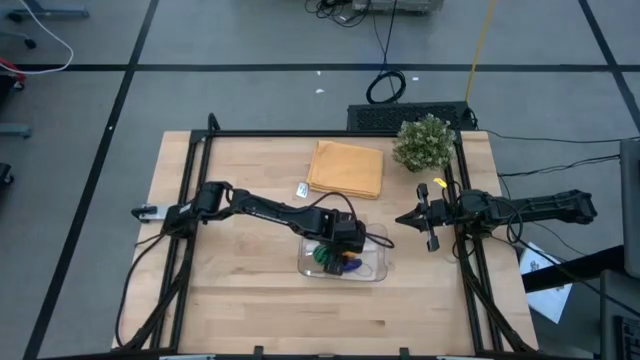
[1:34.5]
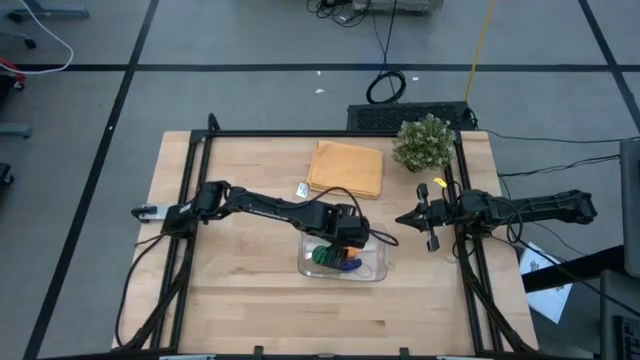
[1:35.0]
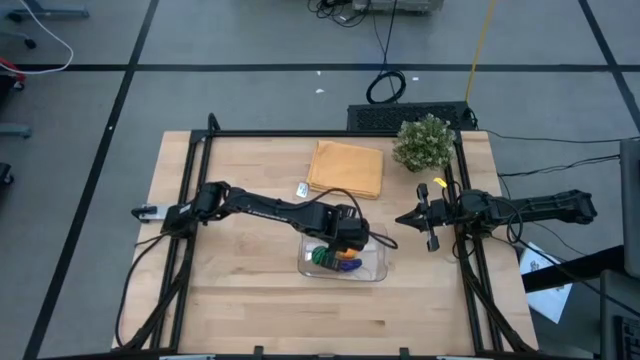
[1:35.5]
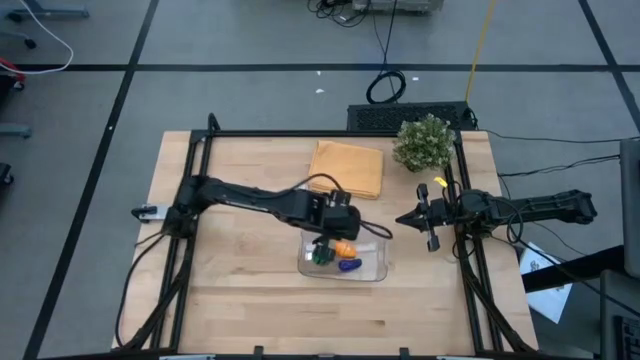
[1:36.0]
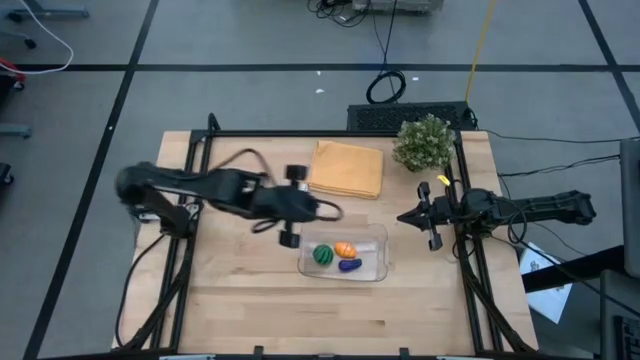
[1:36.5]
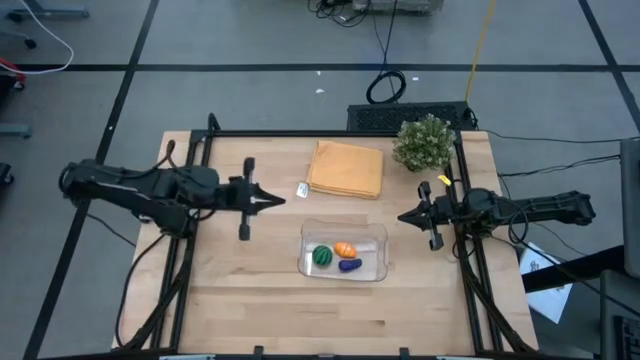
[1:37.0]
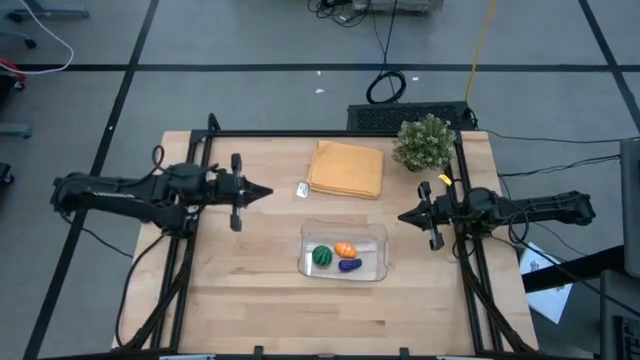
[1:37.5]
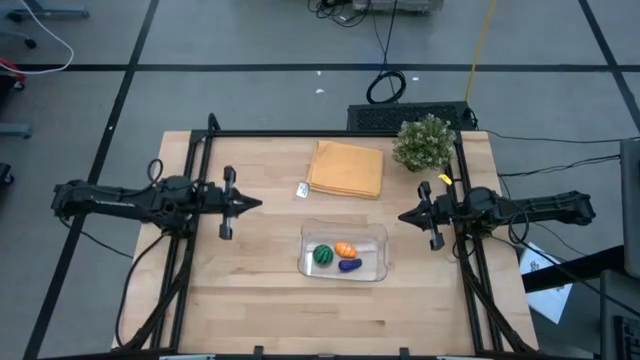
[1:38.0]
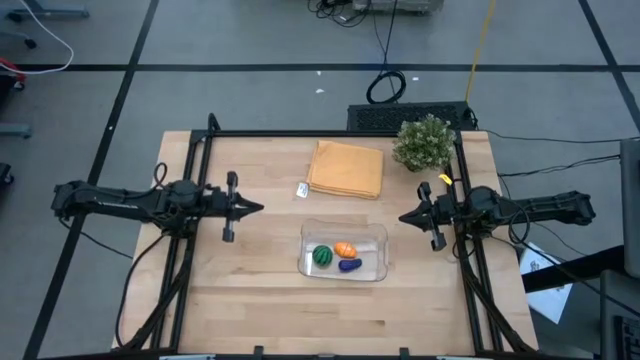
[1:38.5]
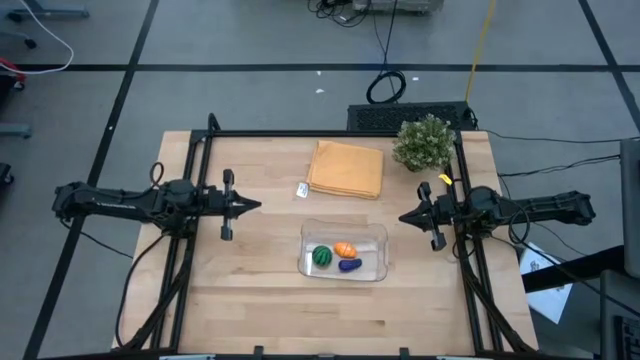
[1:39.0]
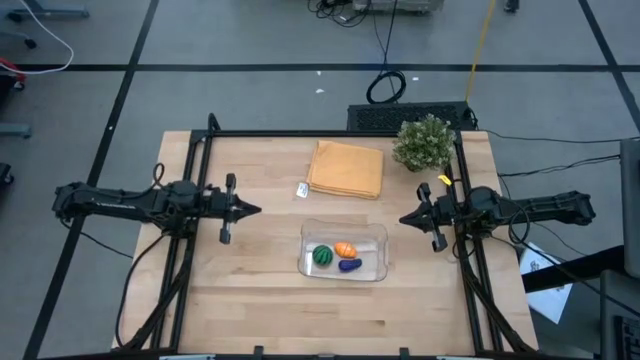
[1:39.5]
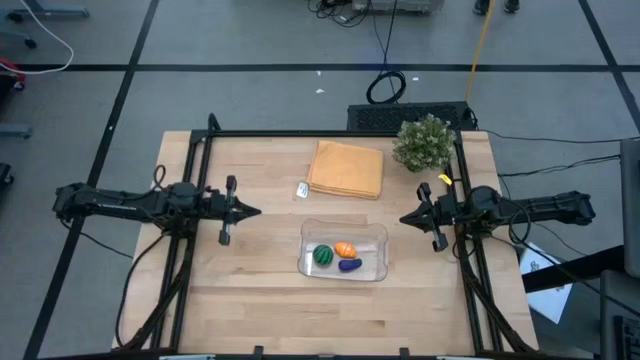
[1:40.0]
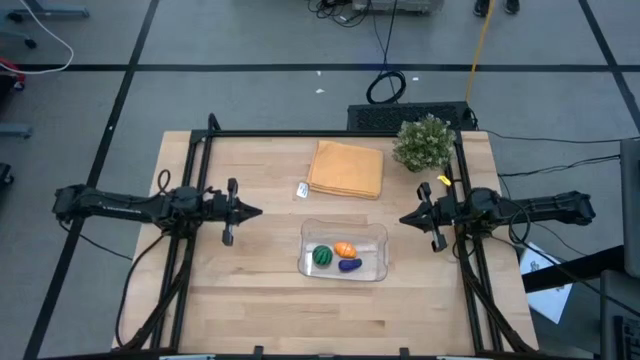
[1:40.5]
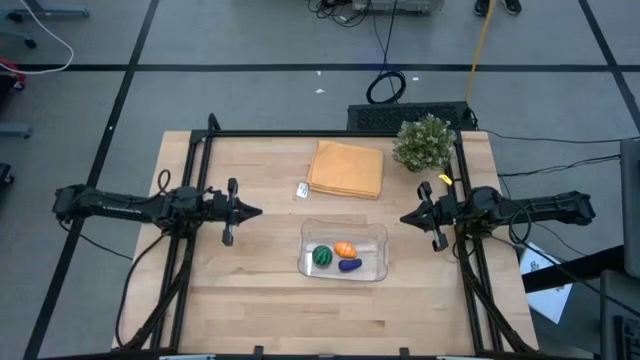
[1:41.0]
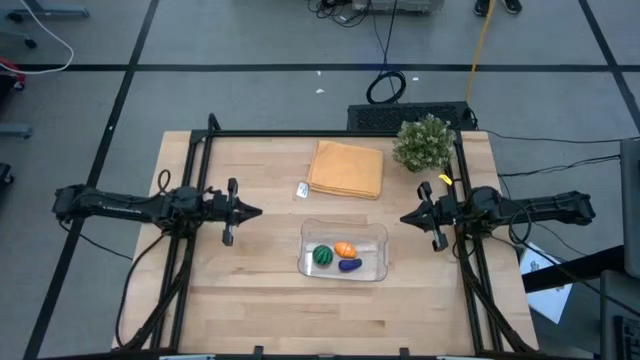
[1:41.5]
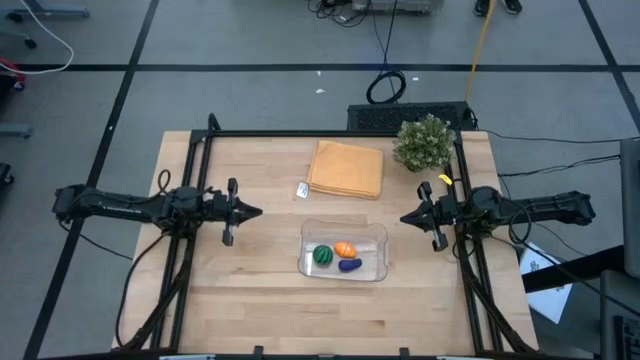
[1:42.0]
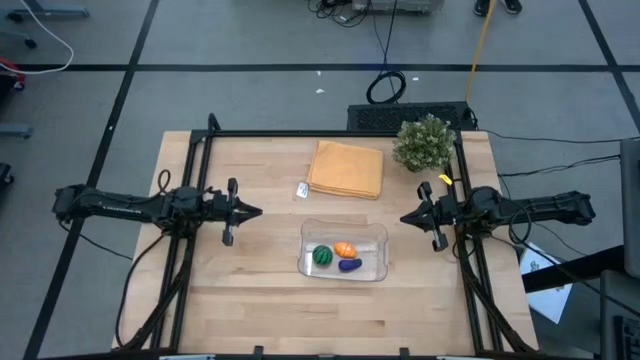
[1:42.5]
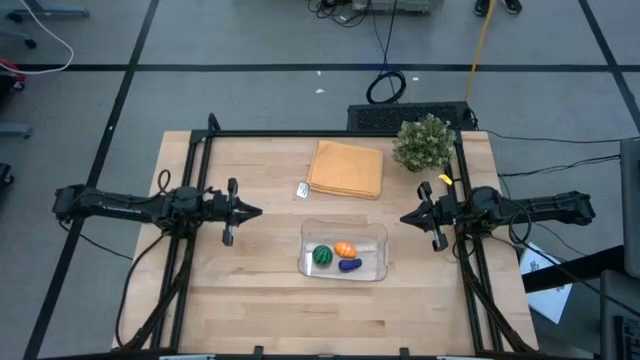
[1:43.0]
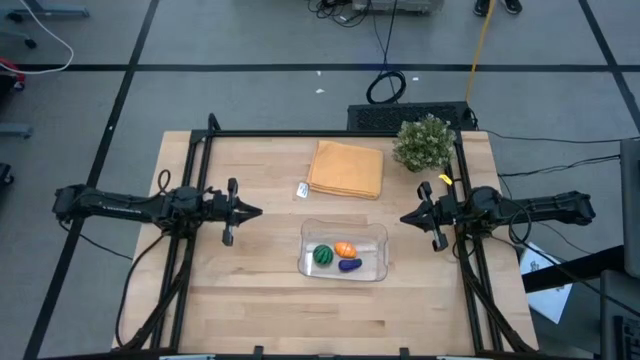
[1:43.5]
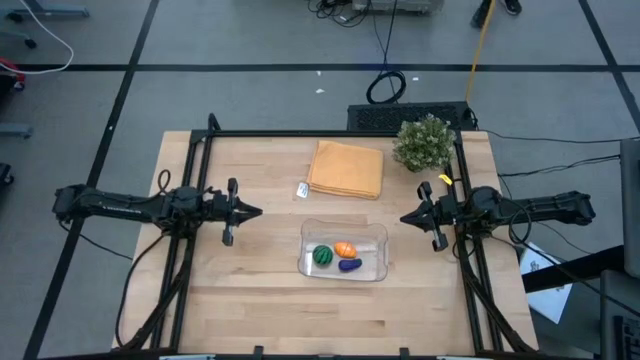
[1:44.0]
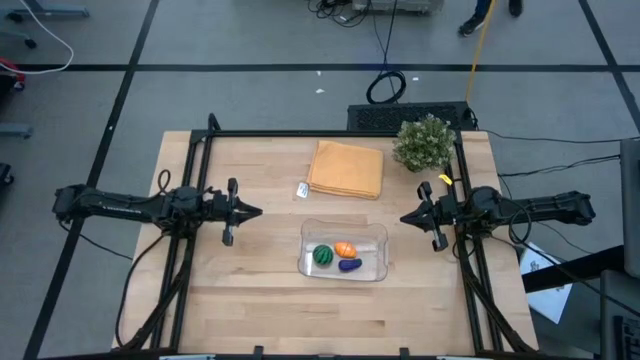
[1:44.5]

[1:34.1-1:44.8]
Task: Pick and placing Produce into tupperware
Return to Home Position

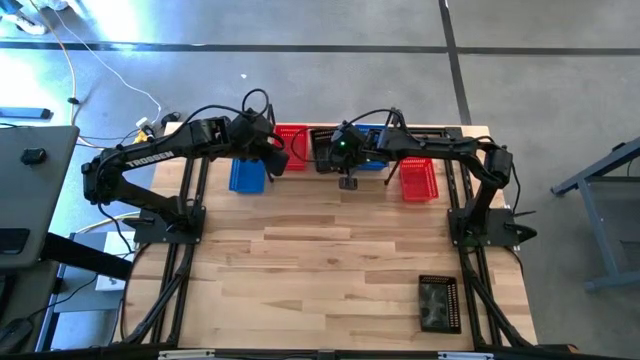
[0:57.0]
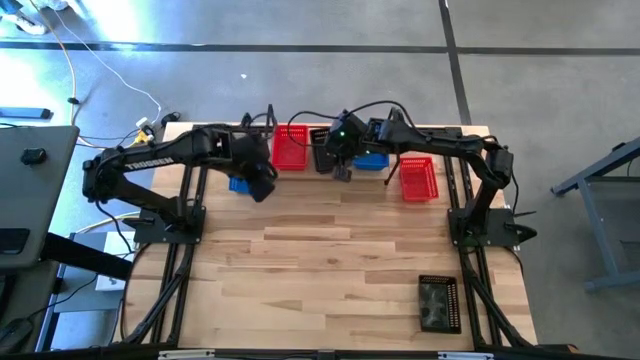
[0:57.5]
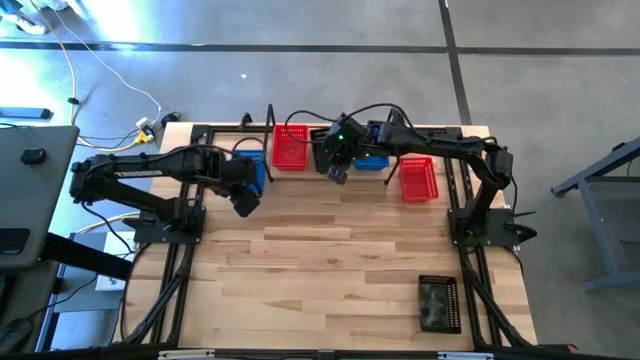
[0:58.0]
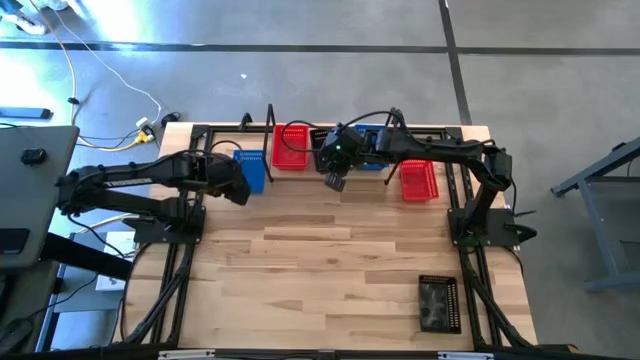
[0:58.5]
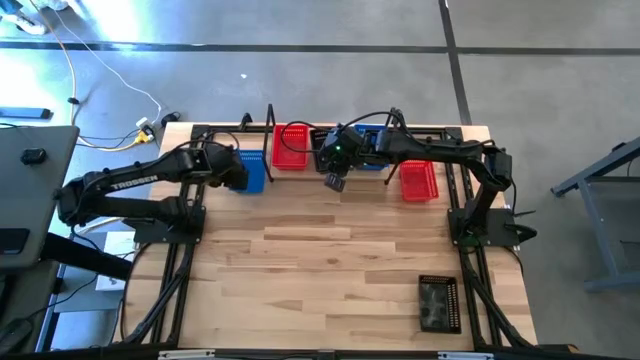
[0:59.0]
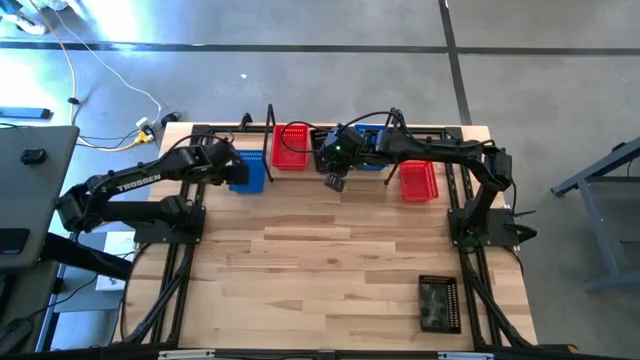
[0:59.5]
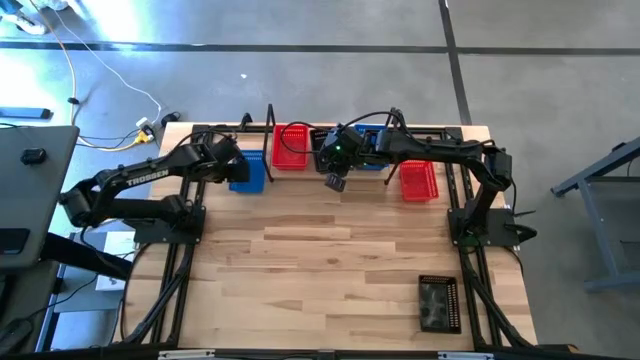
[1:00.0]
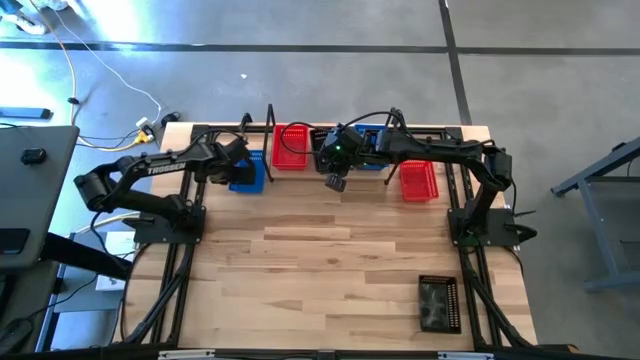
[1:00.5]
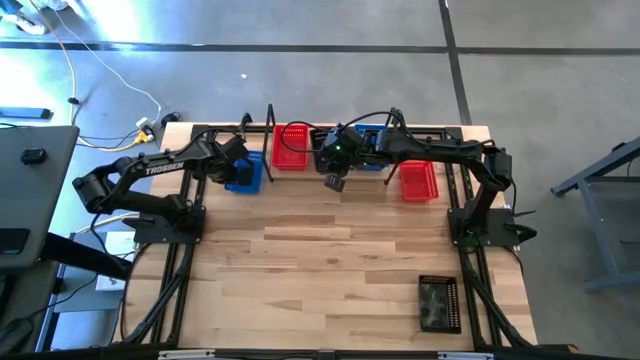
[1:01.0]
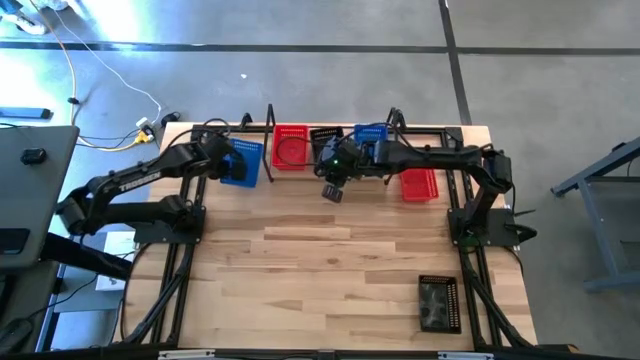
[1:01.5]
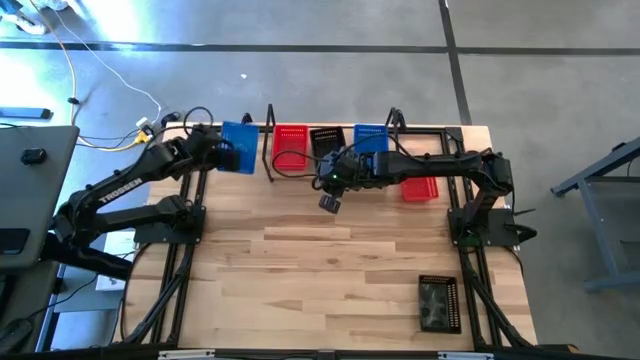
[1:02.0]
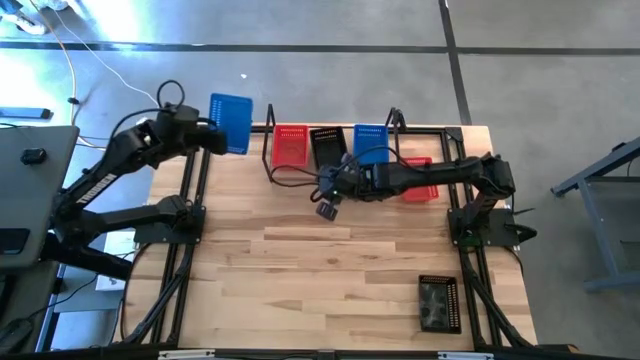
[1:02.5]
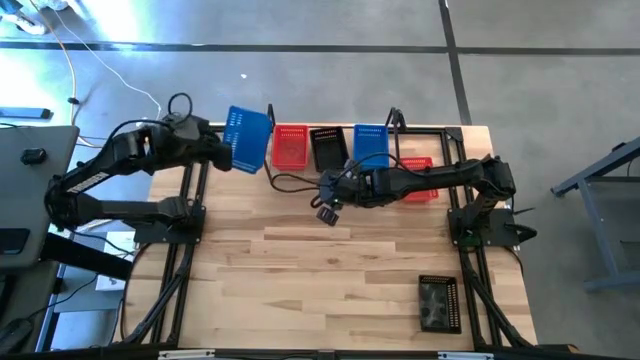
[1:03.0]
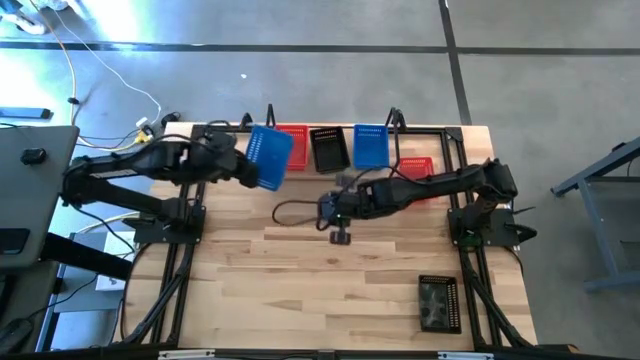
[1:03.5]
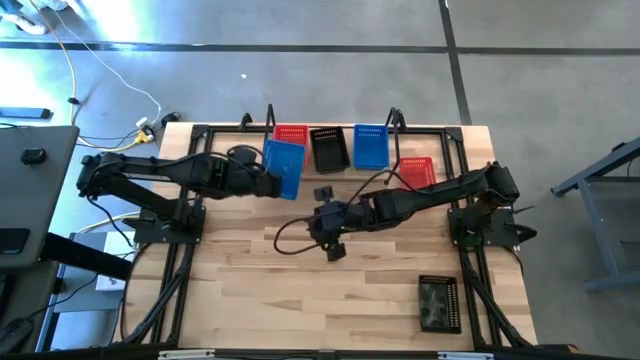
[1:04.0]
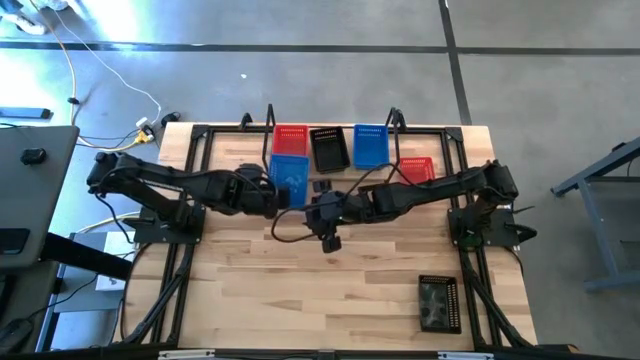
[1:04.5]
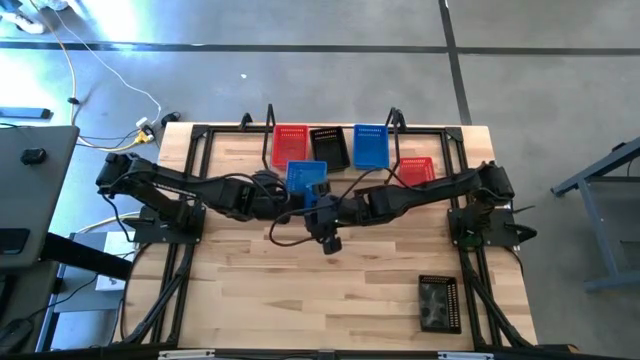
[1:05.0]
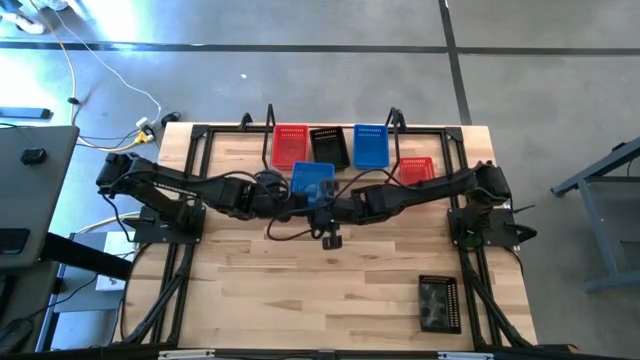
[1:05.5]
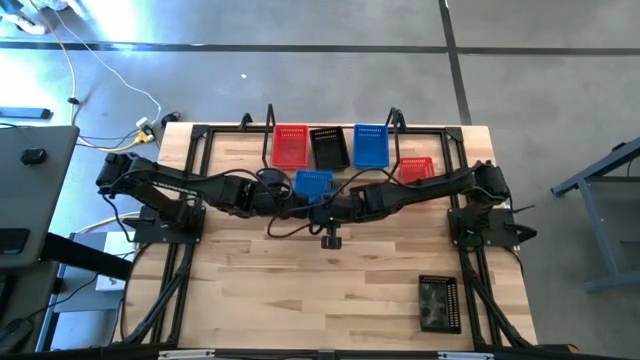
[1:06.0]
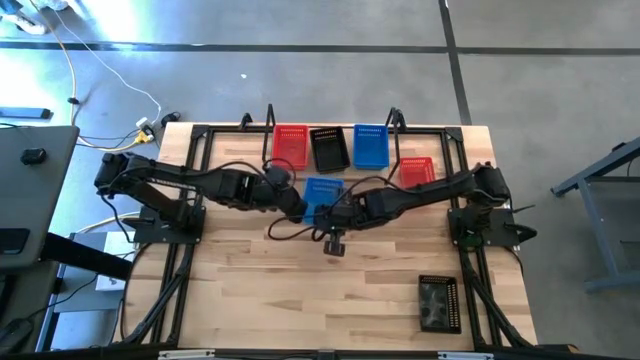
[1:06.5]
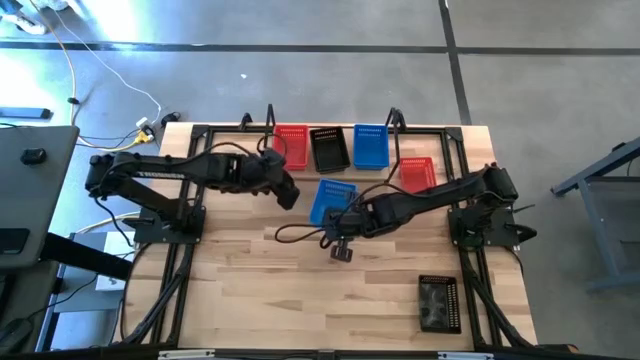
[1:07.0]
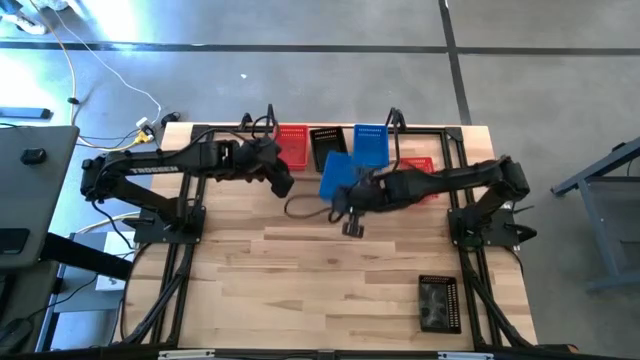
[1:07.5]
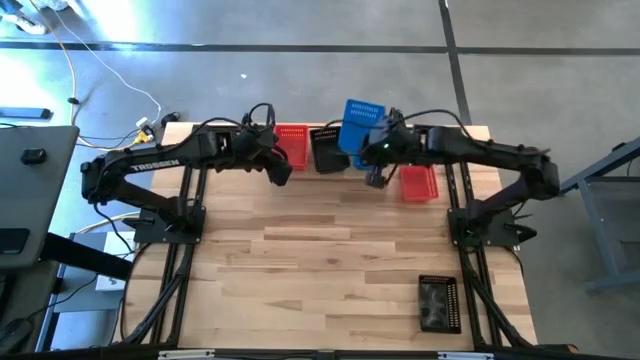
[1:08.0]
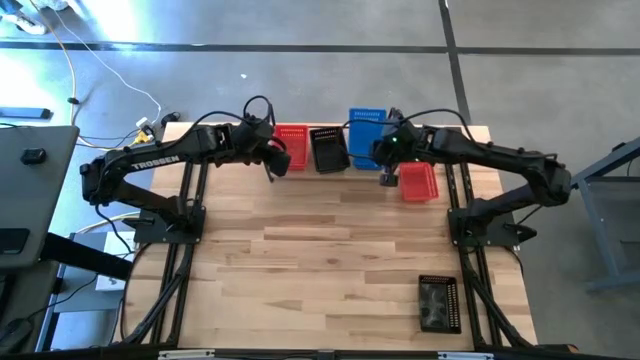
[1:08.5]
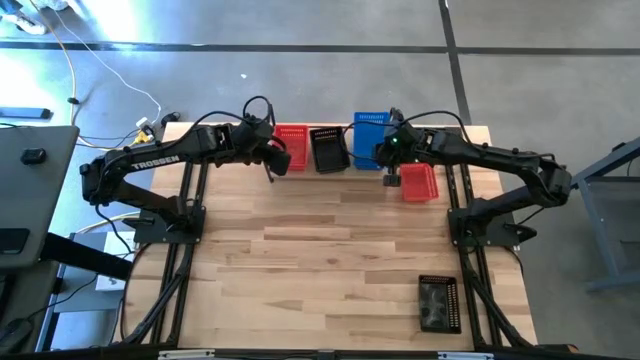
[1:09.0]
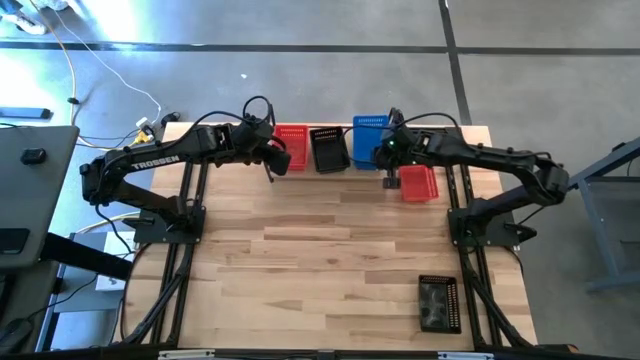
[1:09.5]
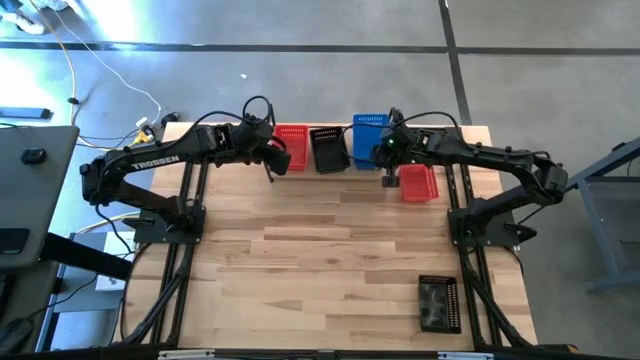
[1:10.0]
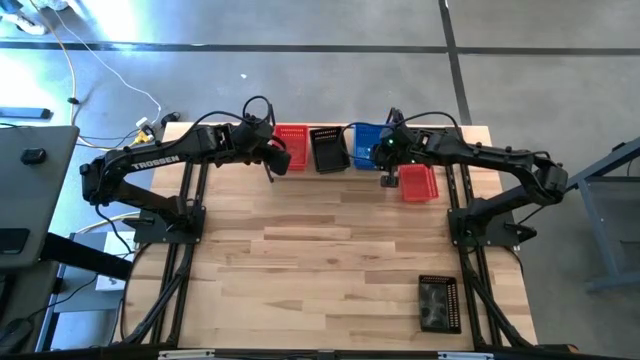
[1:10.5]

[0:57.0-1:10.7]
Task: Stack baskets on shelf by color
Stack the blue basket on top of the blue basket on the shelf
